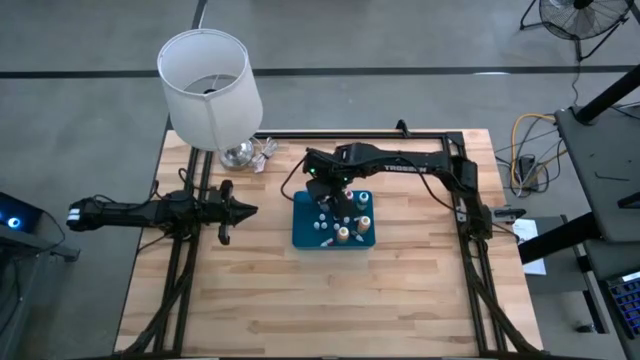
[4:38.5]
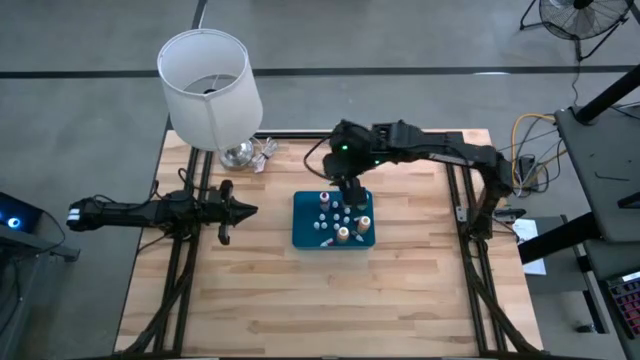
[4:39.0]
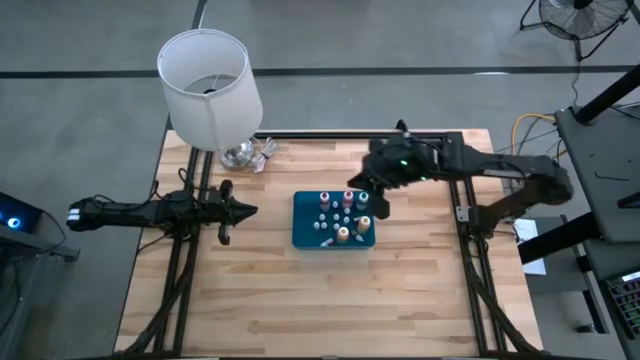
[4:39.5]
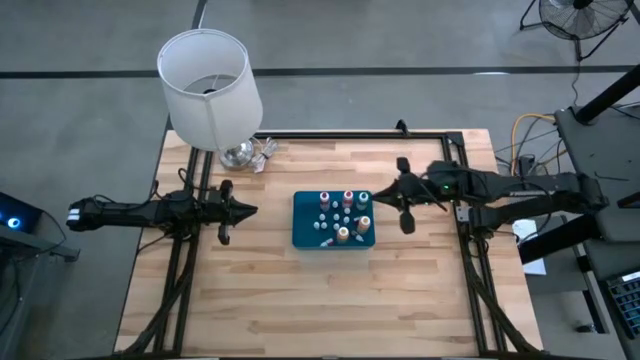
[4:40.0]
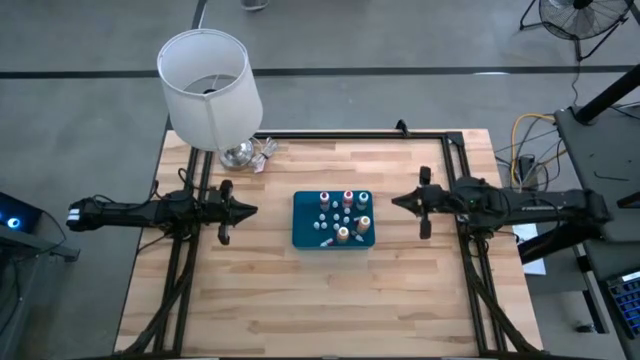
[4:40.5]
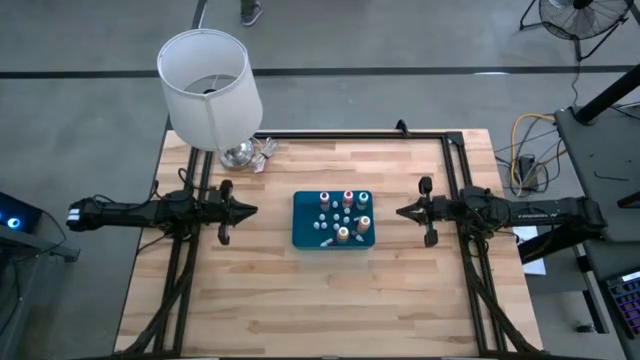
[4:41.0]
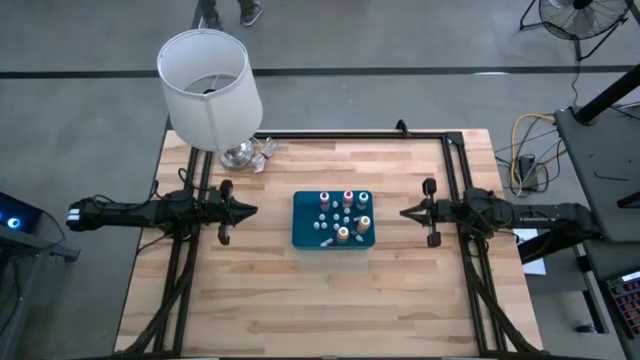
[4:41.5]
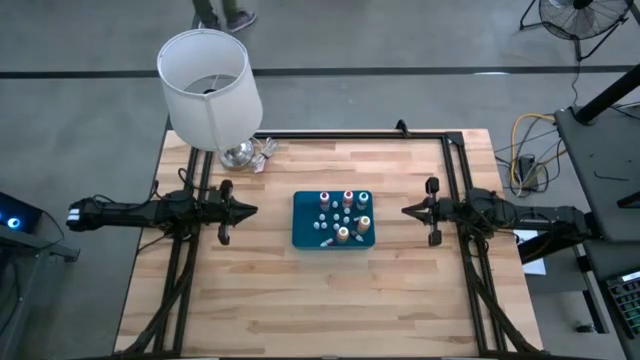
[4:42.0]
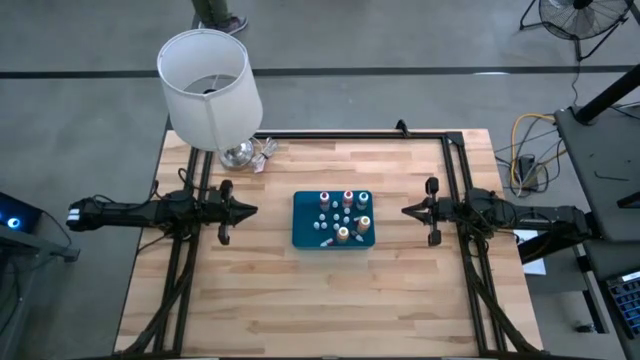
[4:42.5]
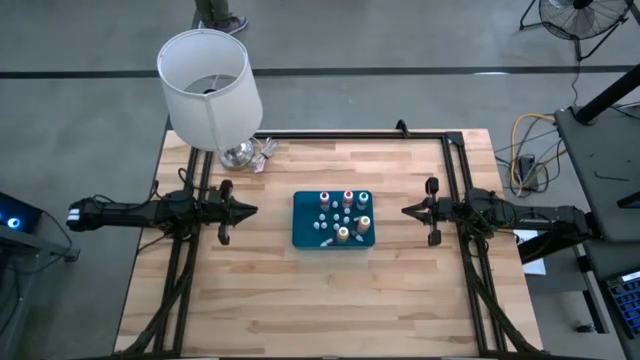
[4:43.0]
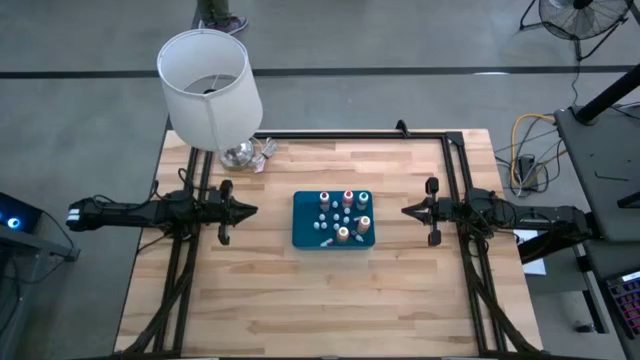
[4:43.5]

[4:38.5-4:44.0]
Task: Pick & Place food coloring
Return to Home Position

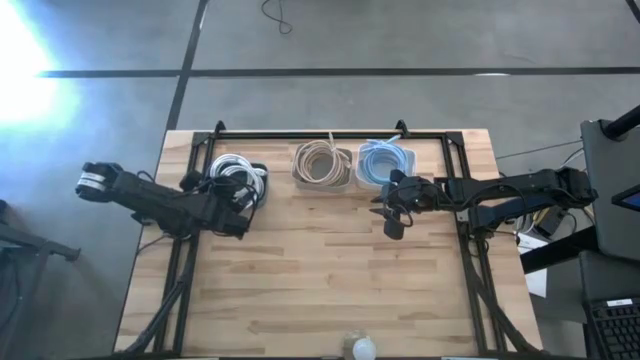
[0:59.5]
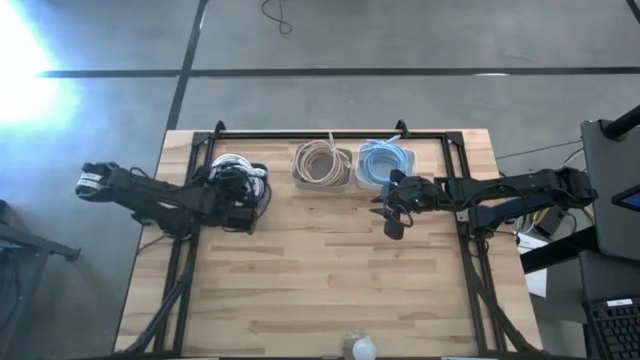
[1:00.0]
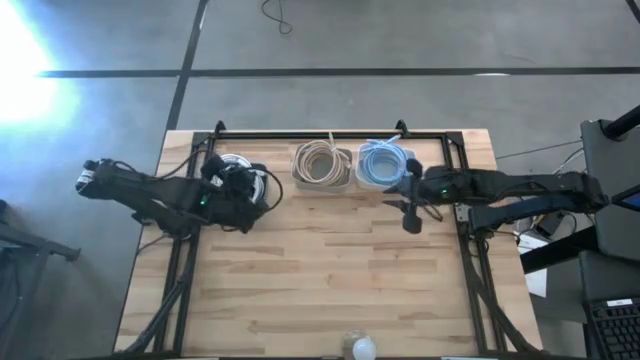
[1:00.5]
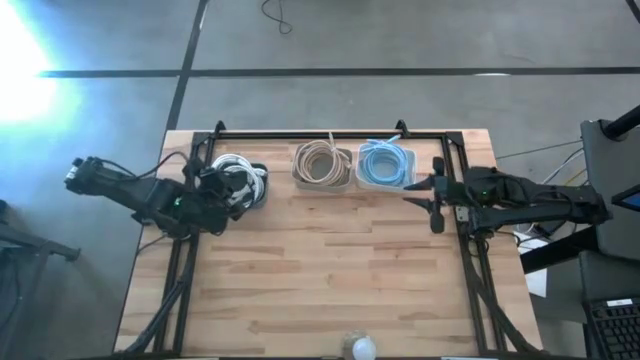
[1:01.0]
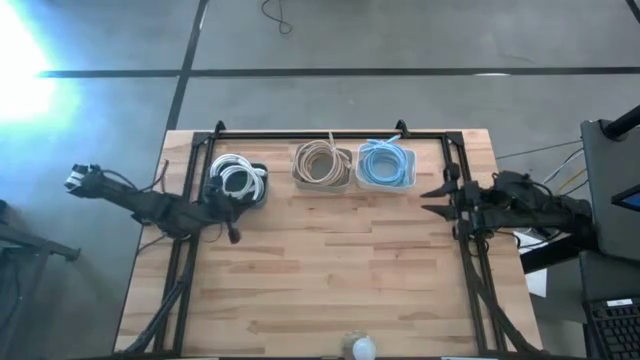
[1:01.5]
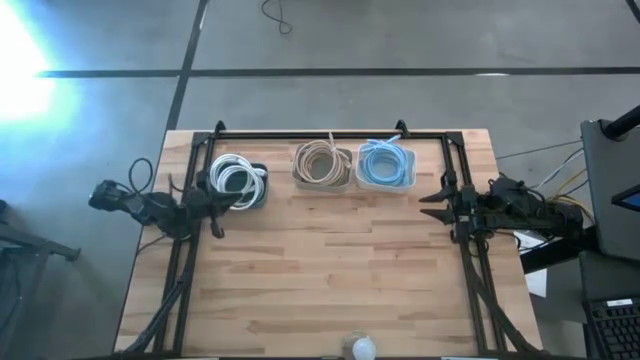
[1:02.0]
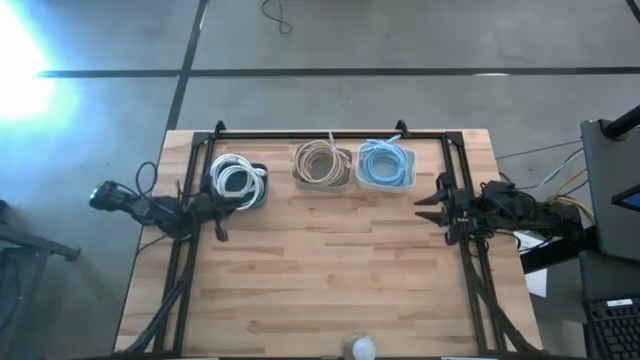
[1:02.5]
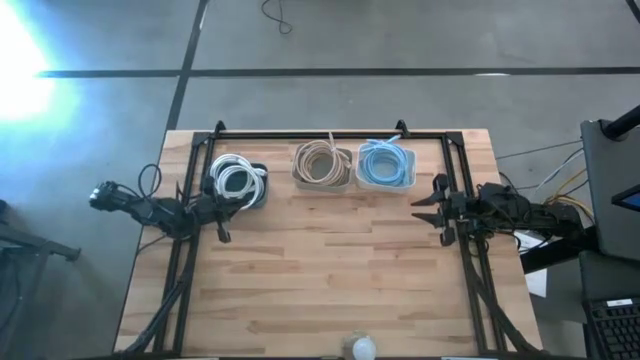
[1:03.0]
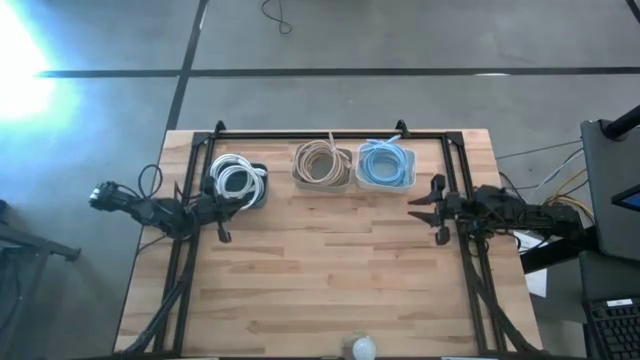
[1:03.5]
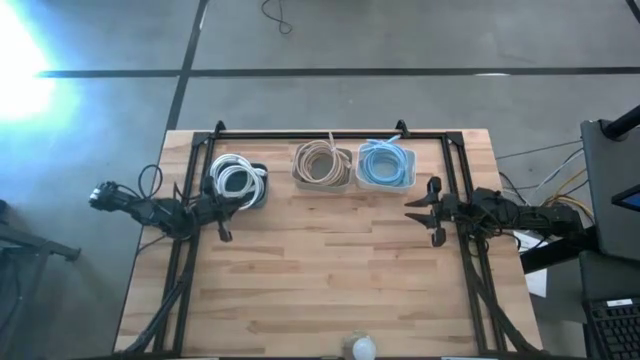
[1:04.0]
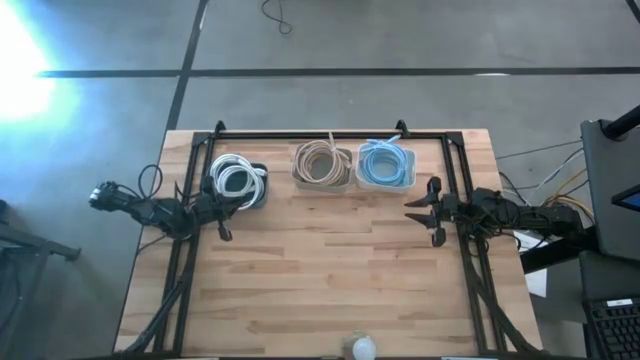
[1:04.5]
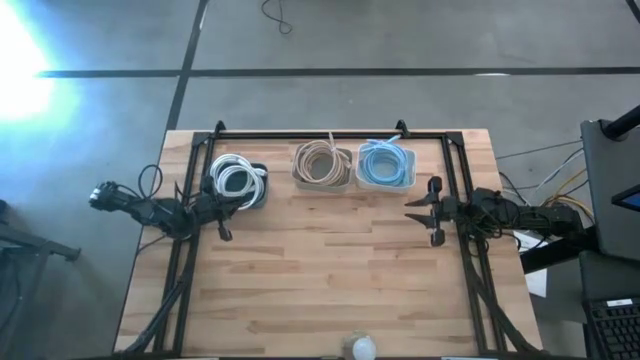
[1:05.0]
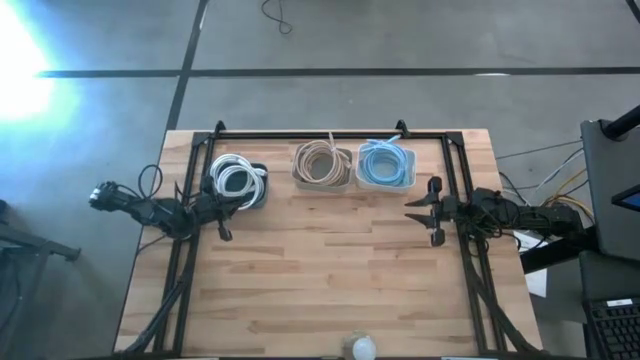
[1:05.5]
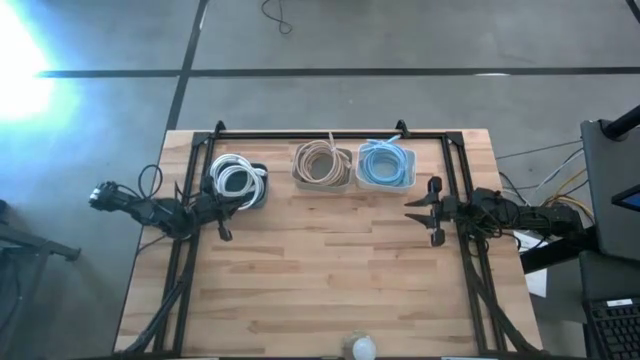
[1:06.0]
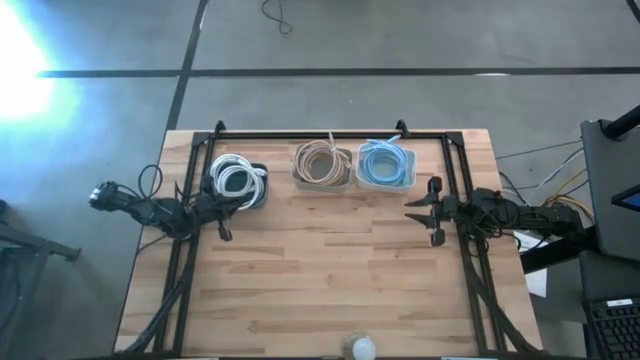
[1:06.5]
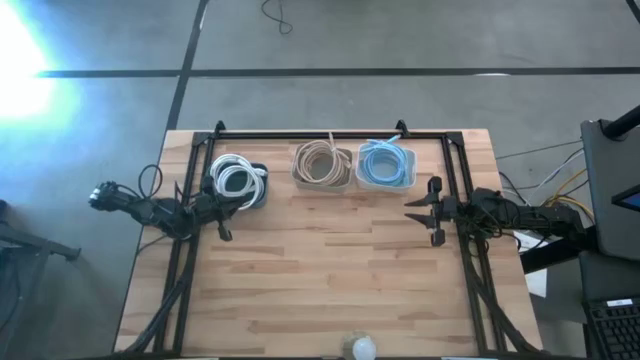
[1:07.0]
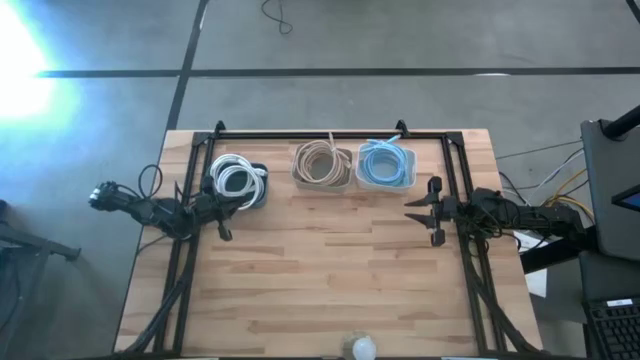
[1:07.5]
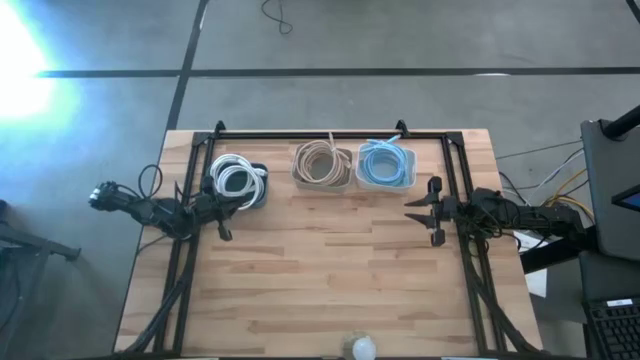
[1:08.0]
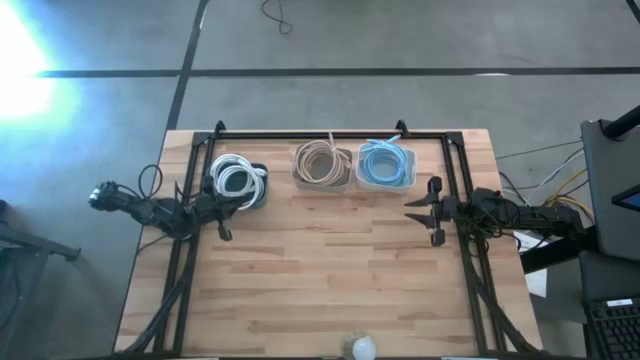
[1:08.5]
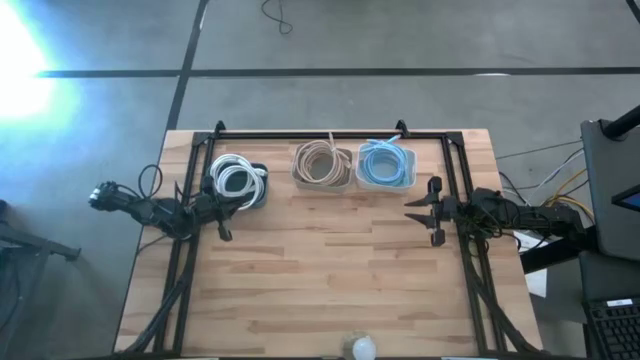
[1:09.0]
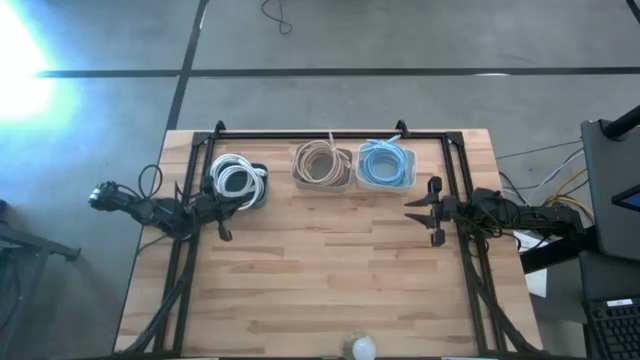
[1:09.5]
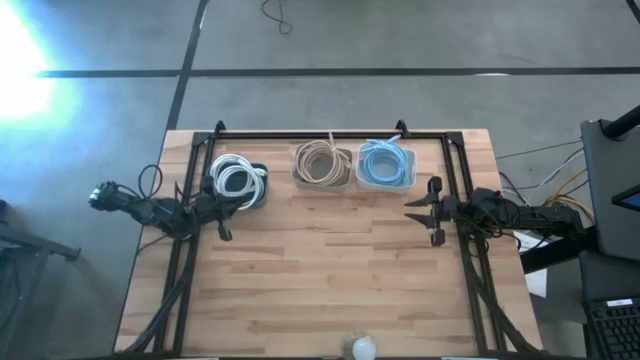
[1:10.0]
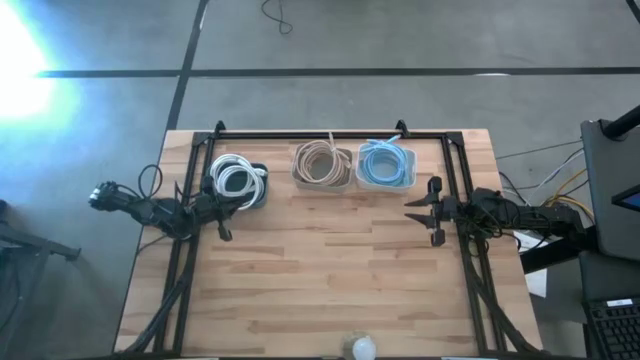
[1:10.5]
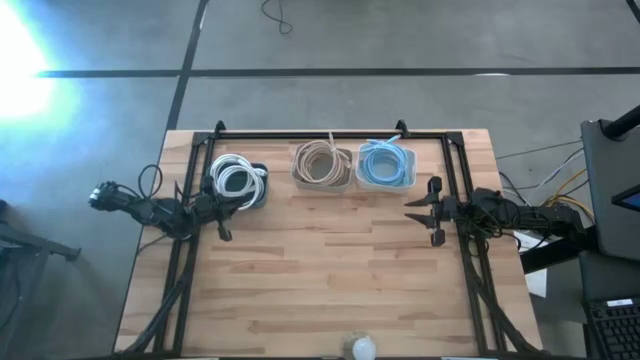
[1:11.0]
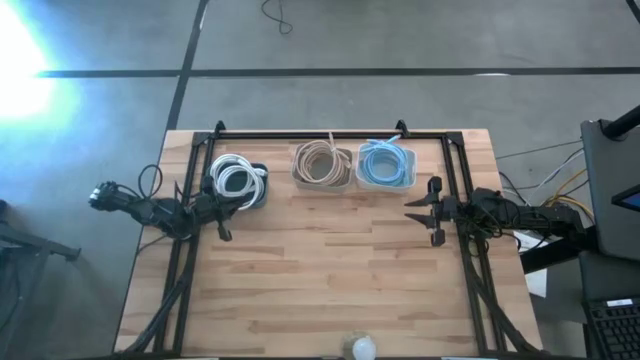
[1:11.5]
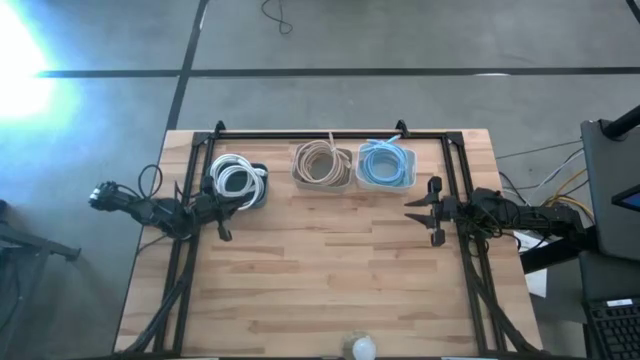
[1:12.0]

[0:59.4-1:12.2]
Task: Pick & Place USB Port
Return to Home Position

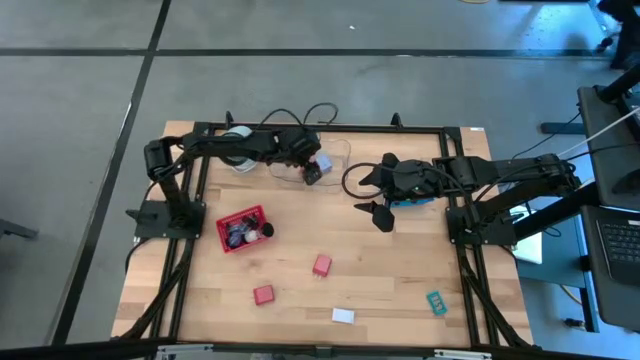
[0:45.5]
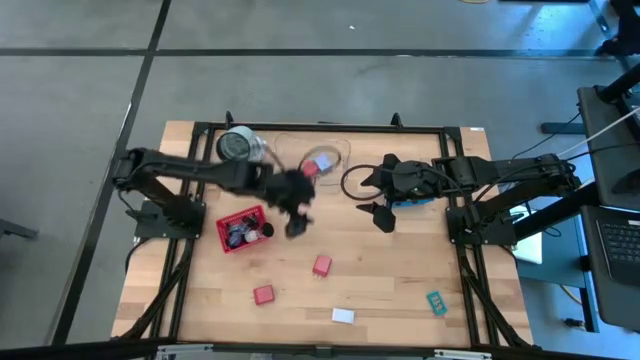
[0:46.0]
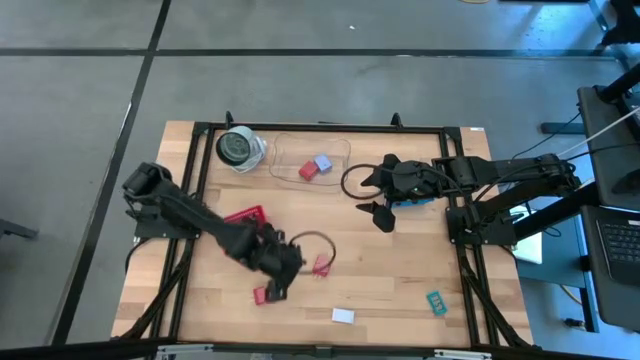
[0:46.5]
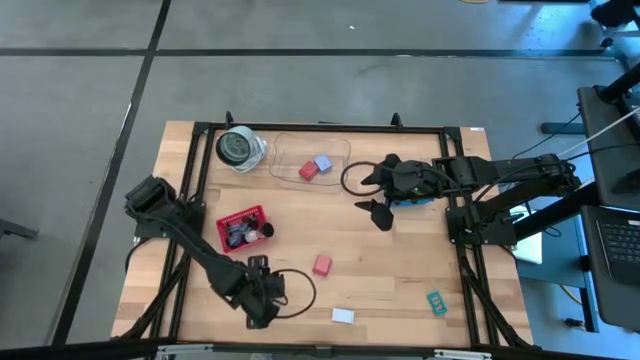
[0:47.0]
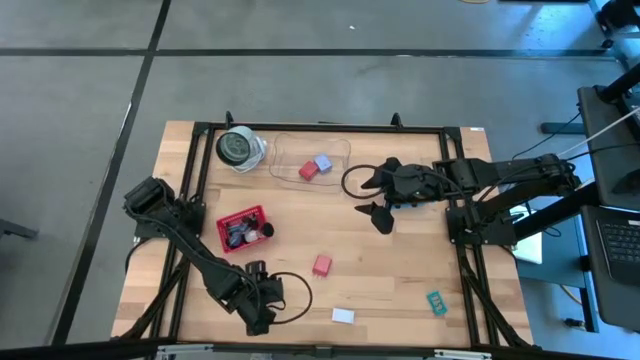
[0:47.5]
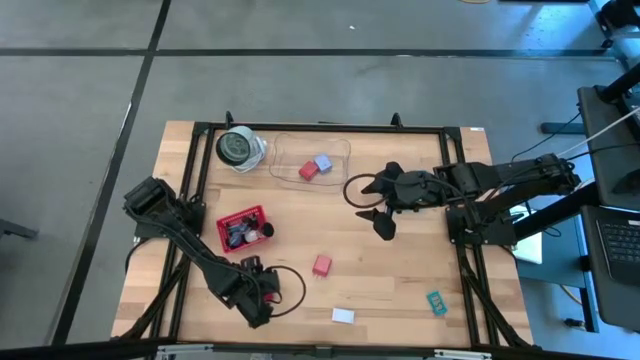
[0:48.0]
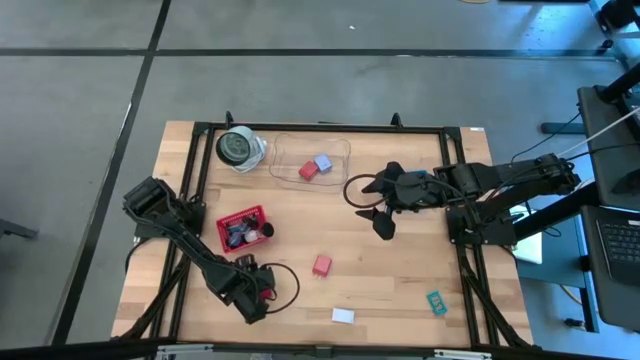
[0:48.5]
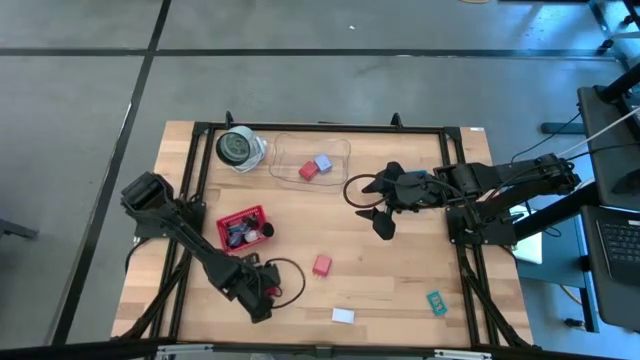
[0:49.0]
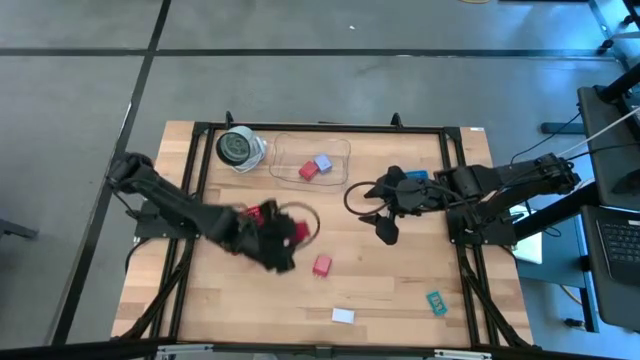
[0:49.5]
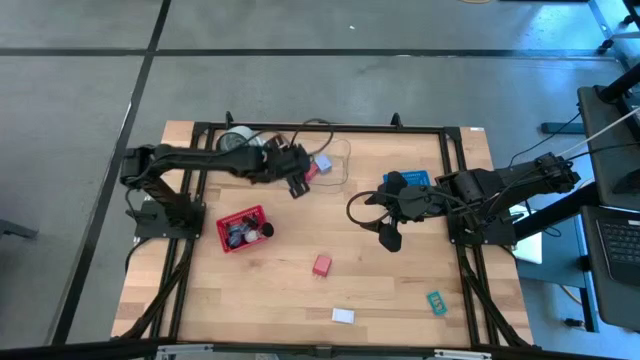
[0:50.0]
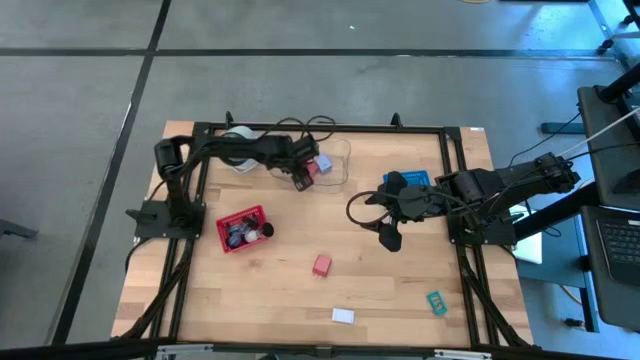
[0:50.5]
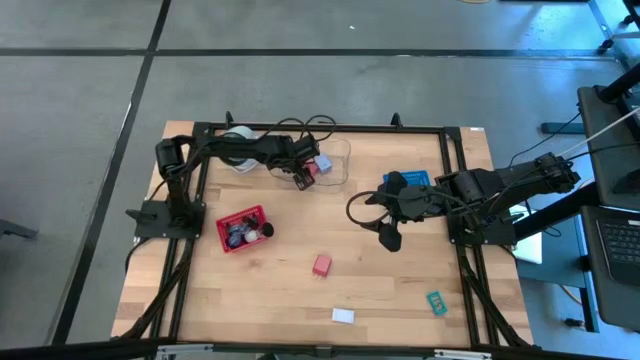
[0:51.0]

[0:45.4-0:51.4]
Task: Pick & Place Office items
Put the left red charger adapter into the transparent bin
